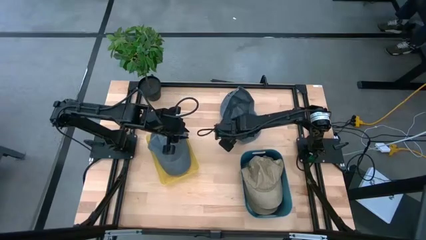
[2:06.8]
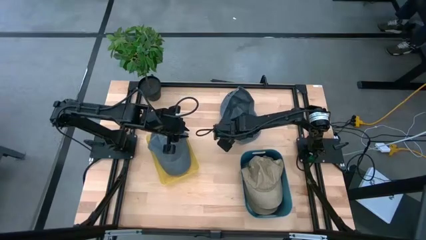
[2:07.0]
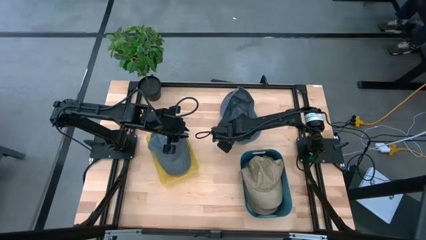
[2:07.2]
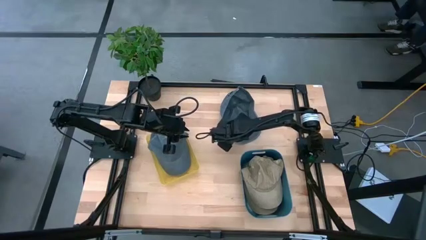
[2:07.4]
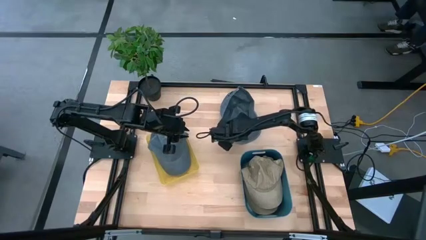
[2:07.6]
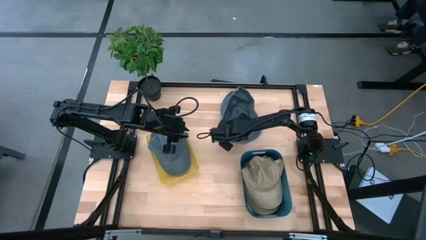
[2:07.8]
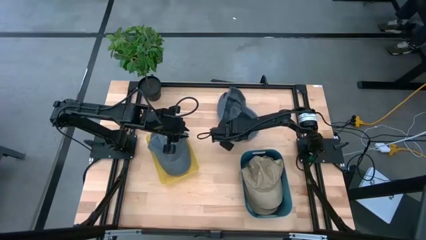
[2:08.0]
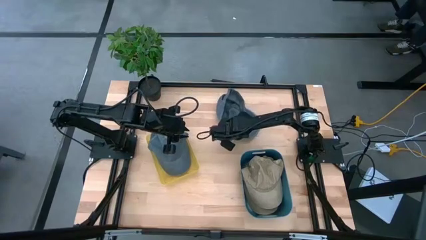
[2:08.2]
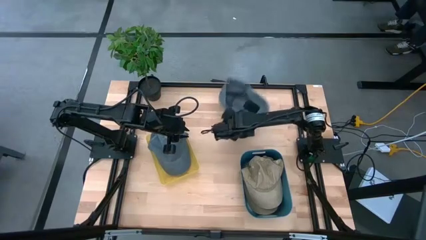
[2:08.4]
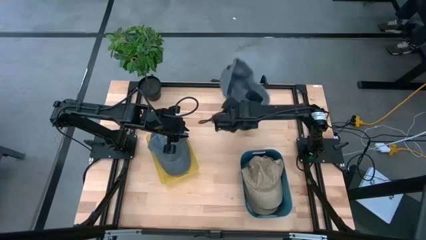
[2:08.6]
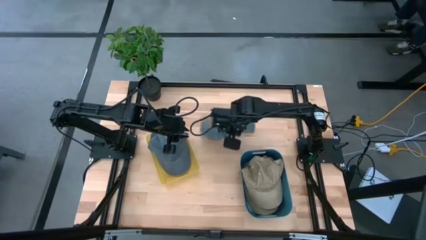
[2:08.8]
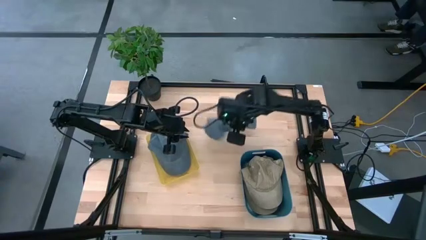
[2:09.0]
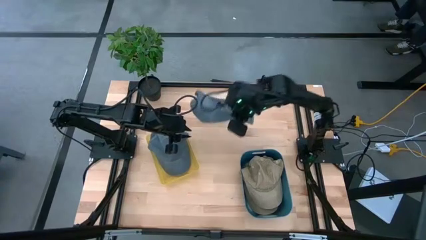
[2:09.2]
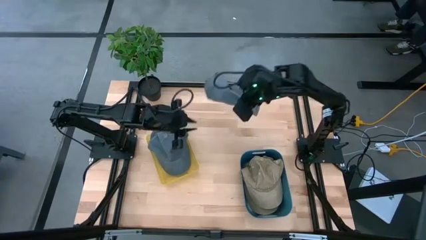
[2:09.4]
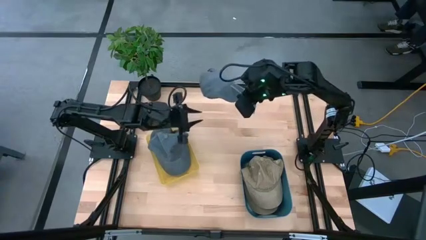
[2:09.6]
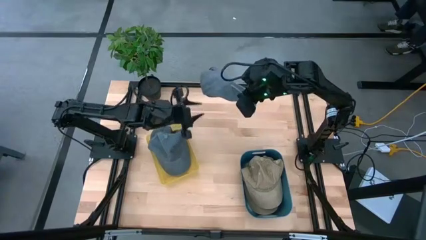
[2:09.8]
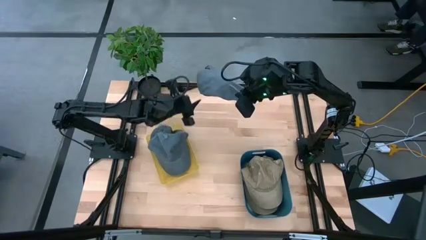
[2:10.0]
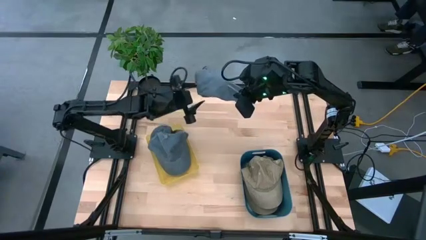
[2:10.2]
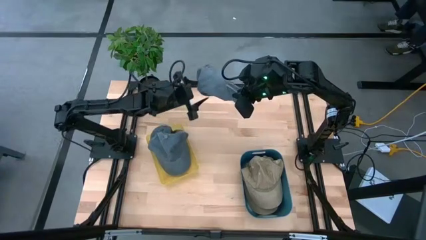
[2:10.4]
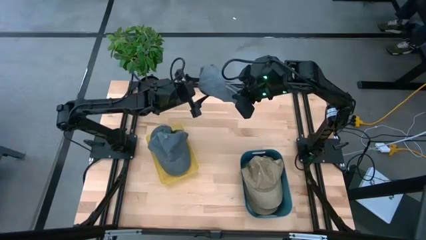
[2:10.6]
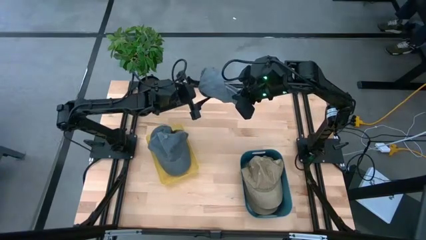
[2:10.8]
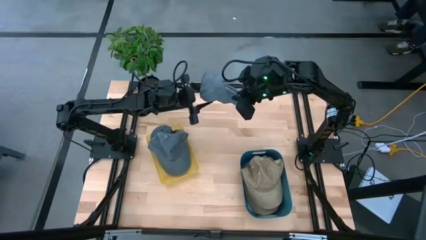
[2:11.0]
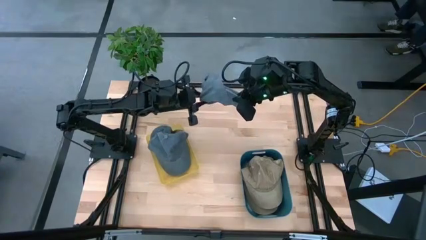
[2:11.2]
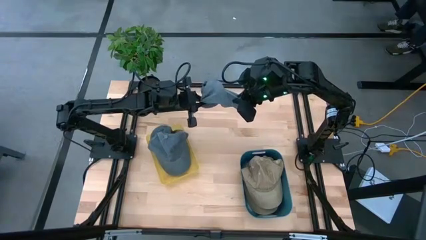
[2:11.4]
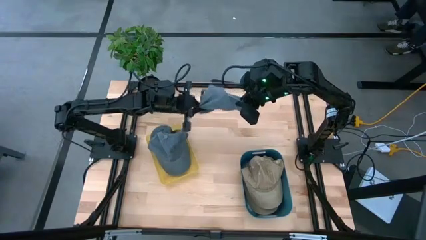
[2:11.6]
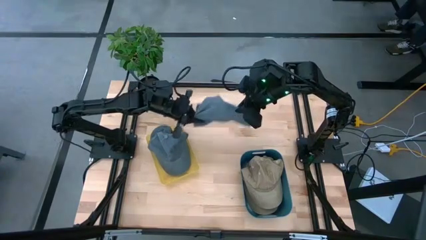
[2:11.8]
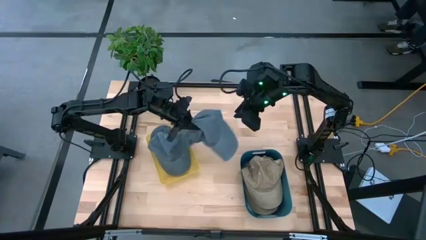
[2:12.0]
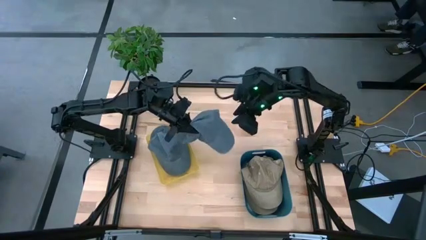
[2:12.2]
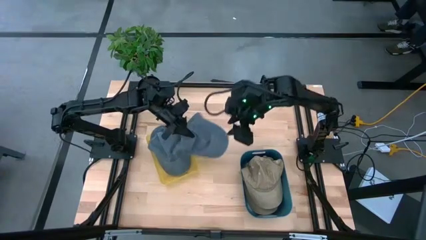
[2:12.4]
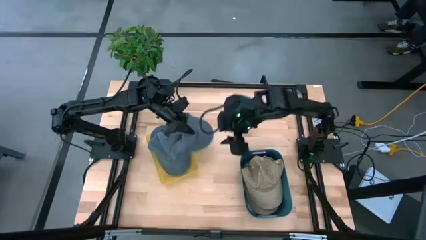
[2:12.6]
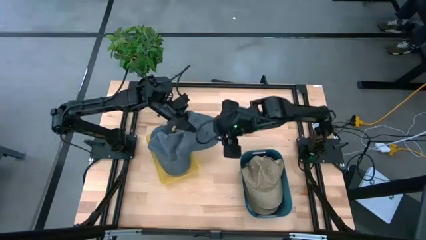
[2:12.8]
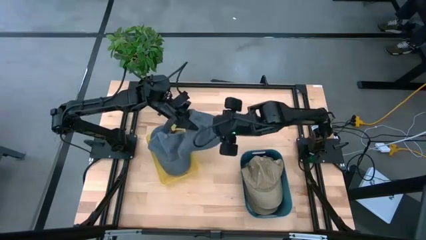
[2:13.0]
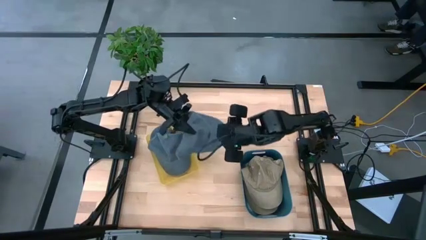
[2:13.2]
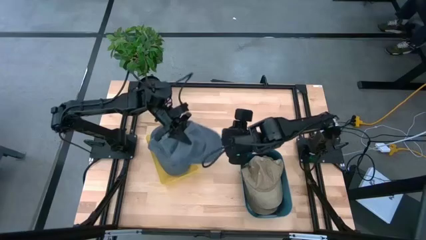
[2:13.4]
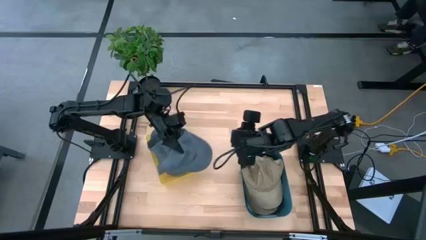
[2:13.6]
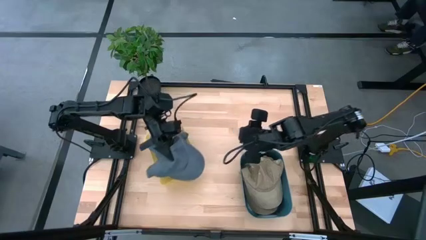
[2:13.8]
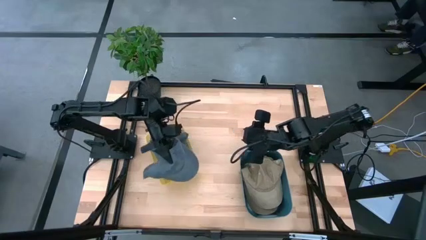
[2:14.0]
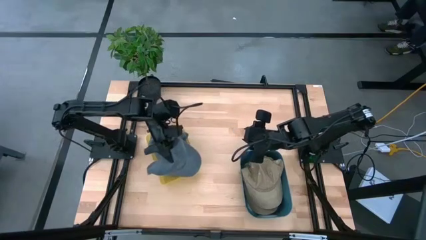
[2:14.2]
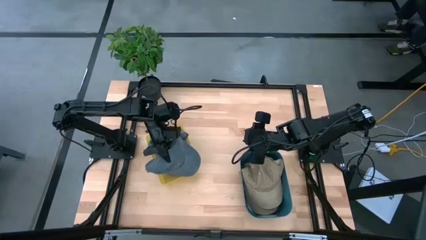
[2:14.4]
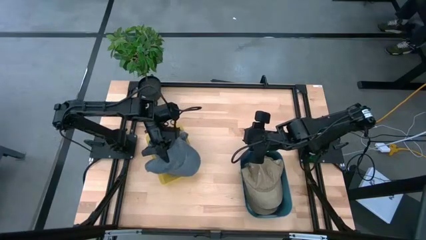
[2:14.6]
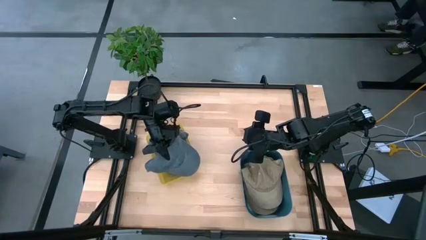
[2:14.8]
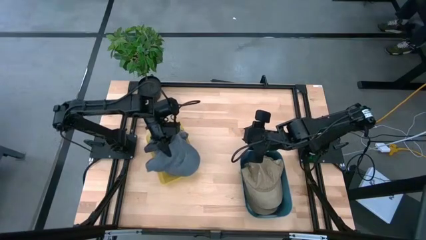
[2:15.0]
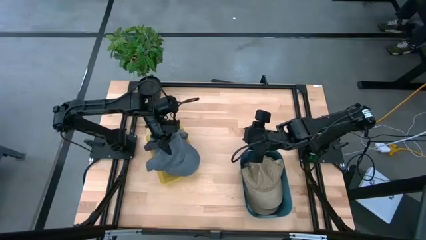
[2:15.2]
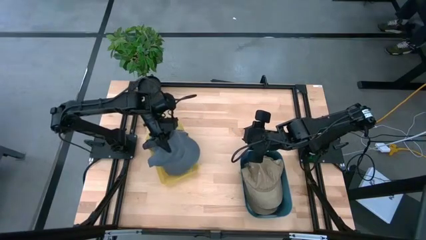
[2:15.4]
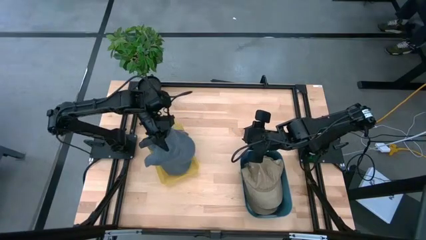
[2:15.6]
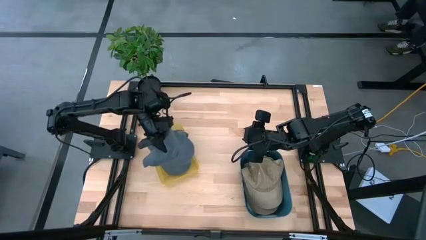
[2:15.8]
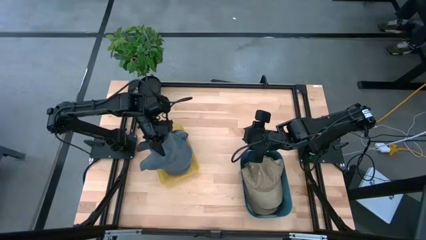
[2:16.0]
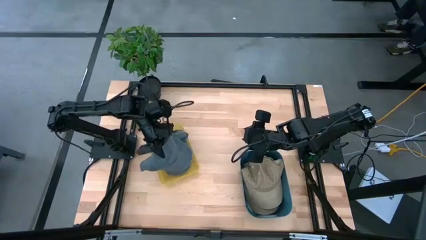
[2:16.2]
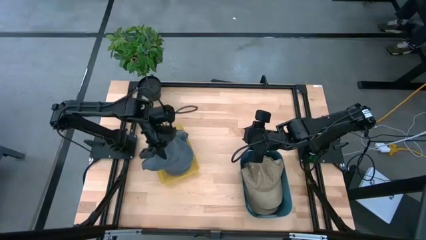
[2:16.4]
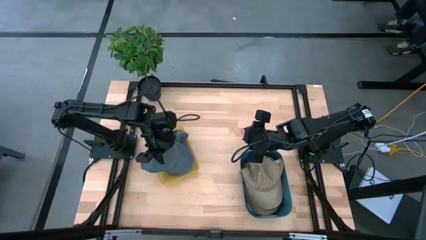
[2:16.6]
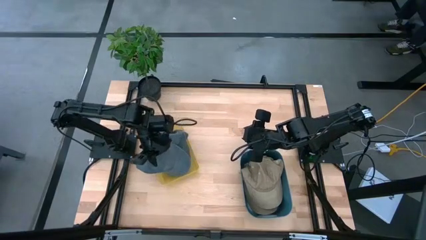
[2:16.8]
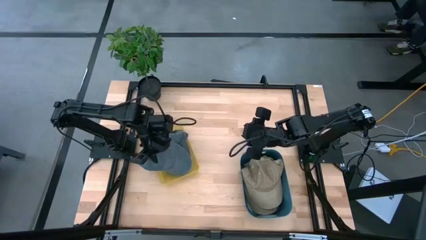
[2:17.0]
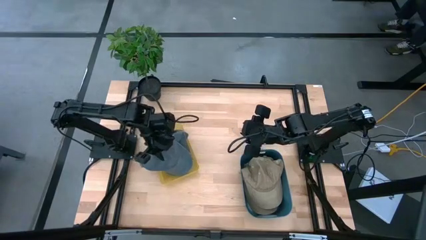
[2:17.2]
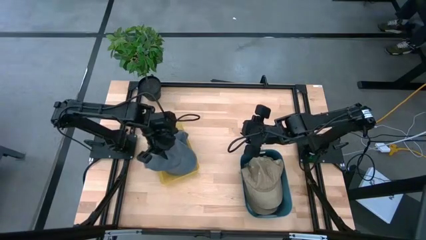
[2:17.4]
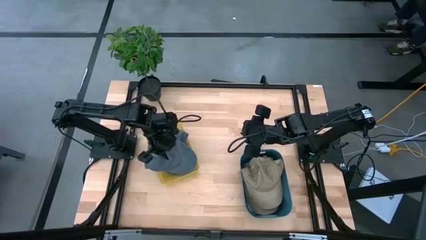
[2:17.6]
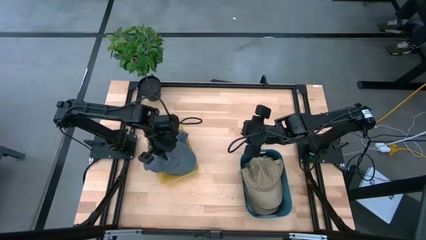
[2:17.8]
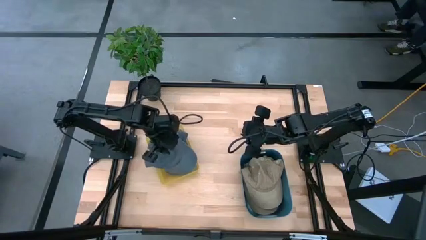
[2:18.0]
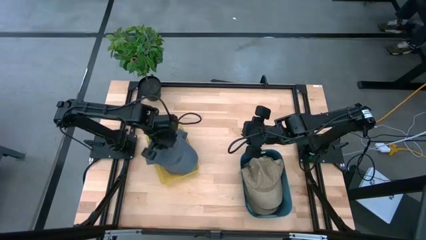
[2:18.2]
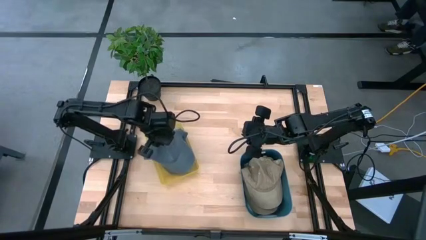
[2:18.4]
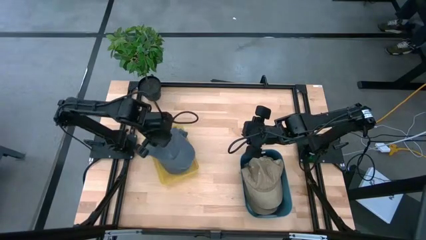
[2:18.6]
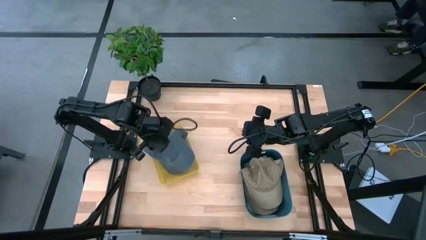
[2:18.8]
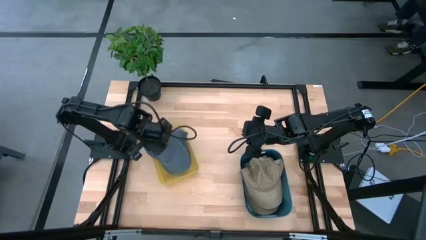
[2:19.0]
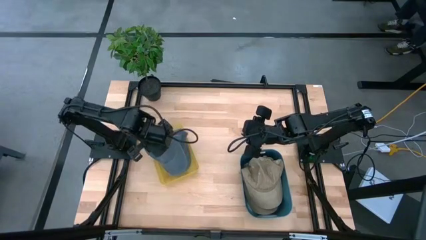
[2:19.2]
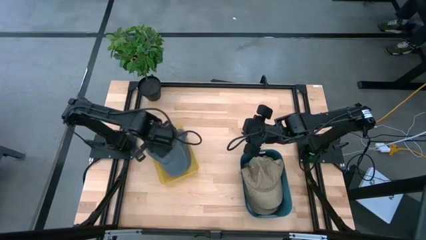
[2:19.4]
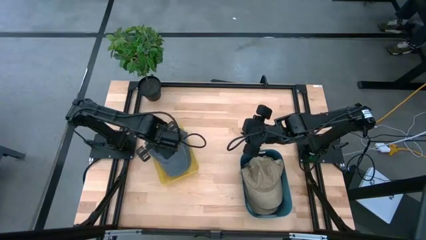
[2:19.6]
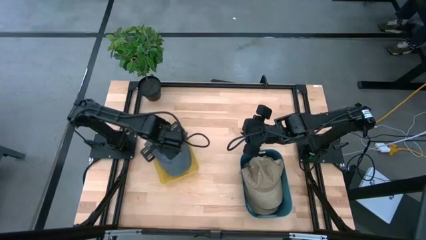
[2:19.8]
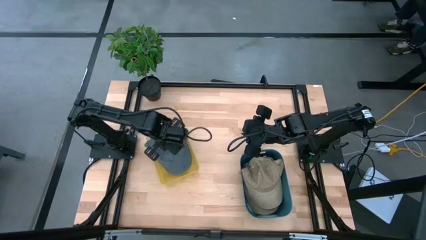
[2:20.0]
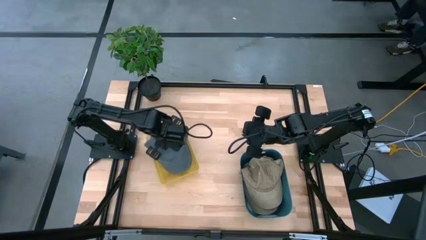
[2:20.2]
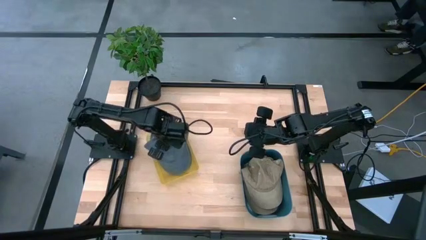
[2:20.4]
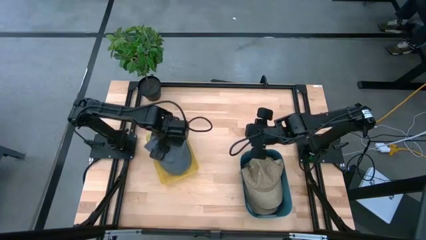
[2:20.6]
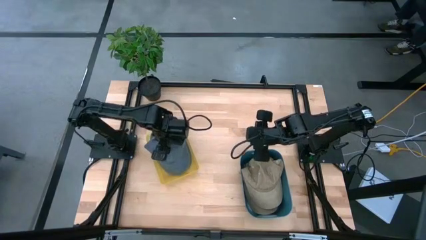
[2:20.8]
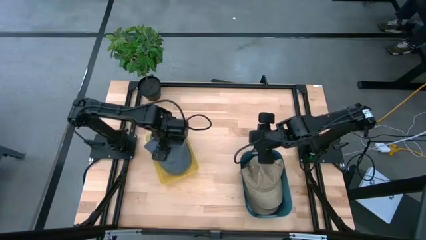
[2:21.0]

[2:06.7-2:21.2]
Task: Pick & Place hat
Put the gray cap into the blue bin
